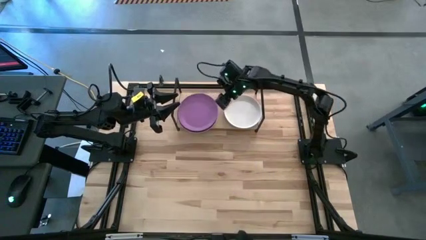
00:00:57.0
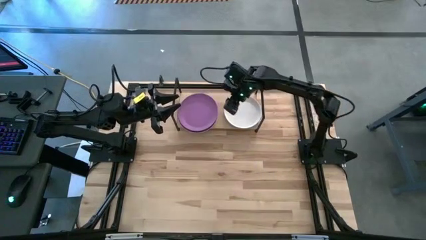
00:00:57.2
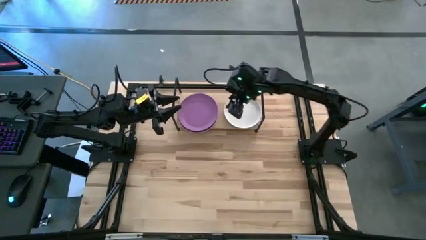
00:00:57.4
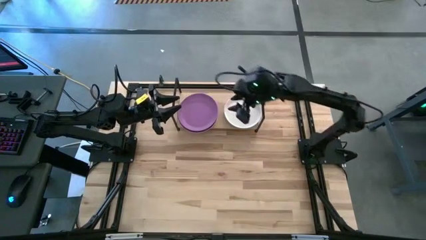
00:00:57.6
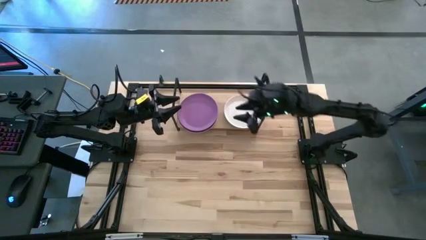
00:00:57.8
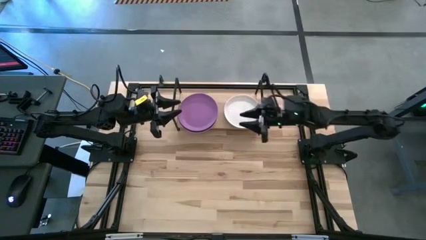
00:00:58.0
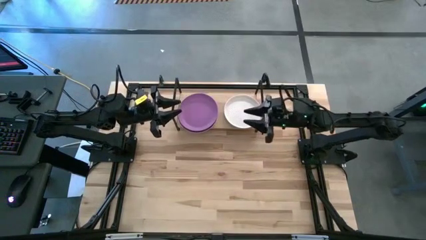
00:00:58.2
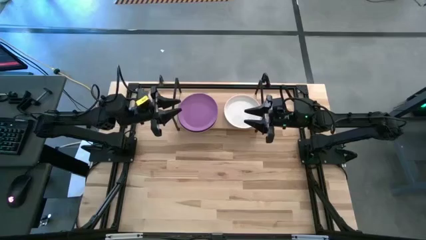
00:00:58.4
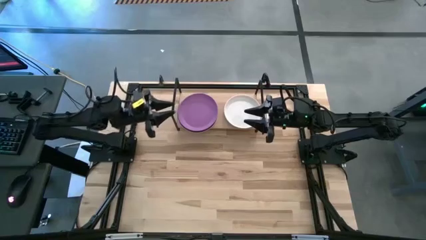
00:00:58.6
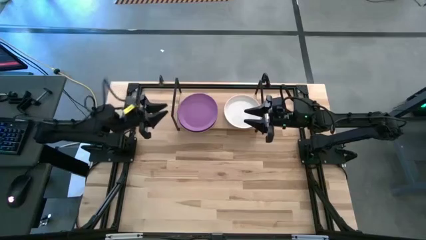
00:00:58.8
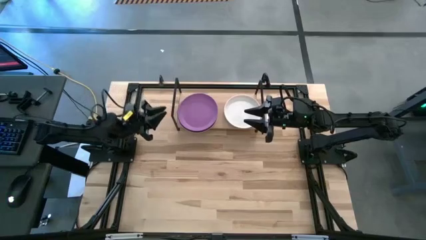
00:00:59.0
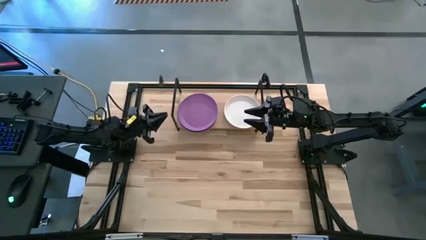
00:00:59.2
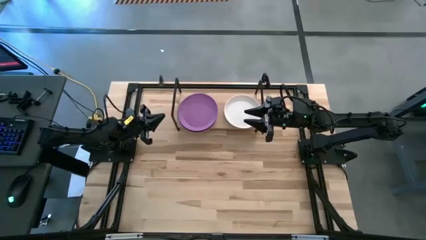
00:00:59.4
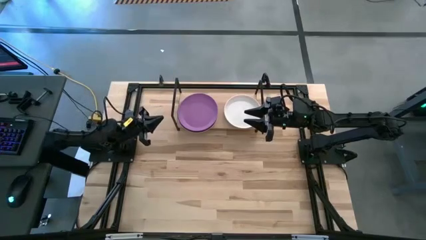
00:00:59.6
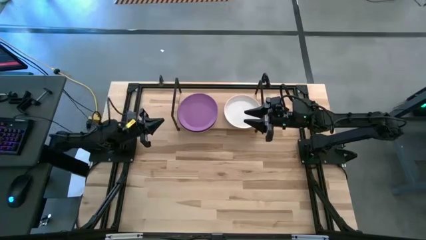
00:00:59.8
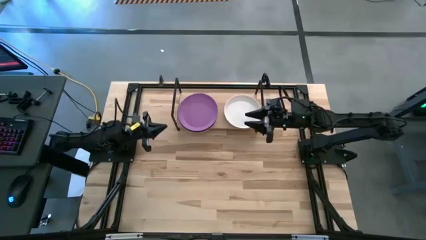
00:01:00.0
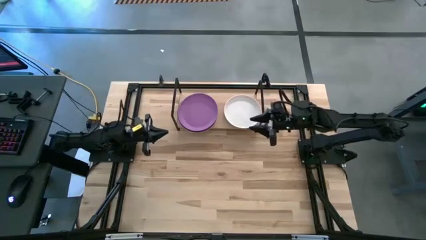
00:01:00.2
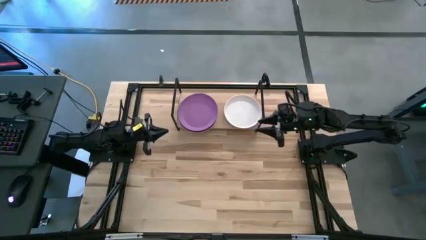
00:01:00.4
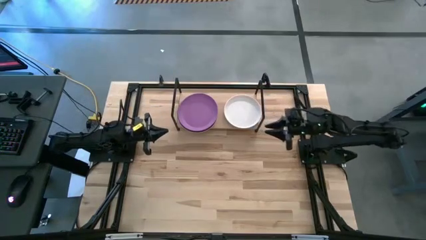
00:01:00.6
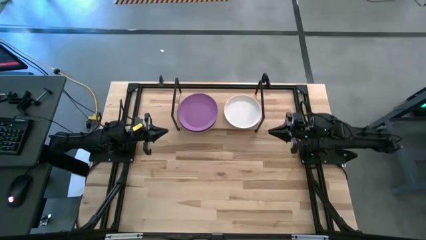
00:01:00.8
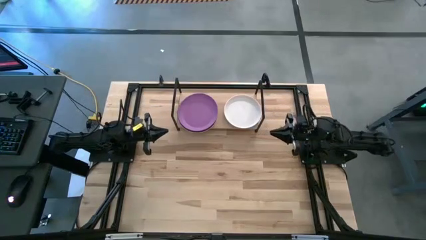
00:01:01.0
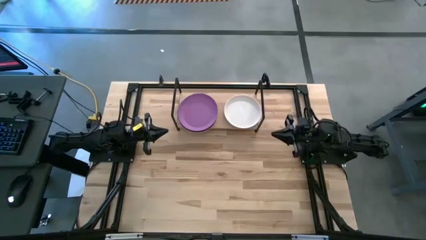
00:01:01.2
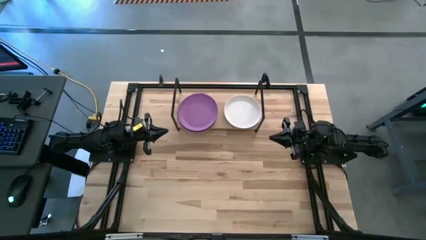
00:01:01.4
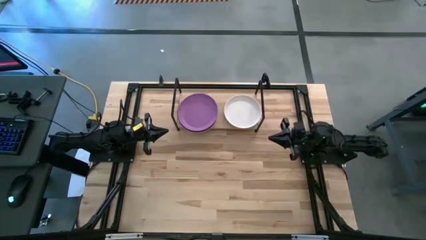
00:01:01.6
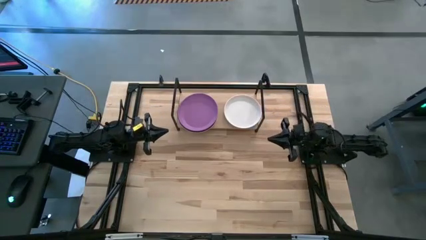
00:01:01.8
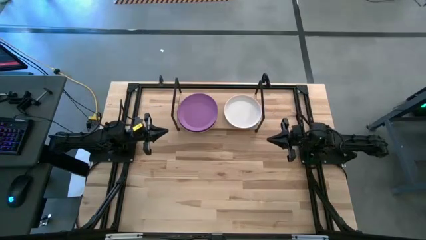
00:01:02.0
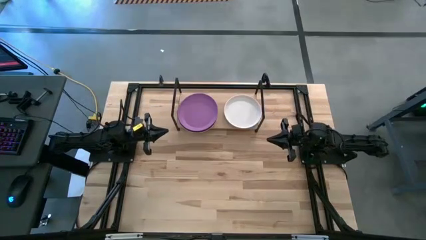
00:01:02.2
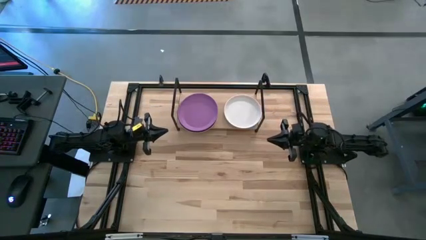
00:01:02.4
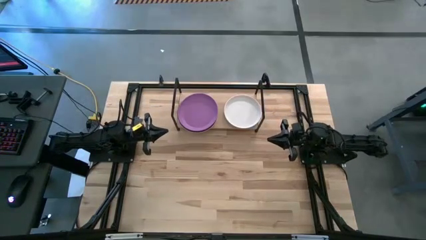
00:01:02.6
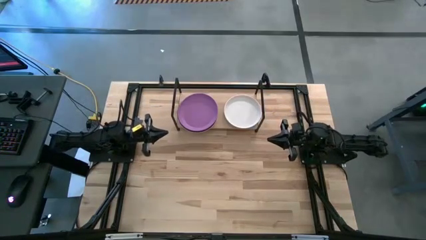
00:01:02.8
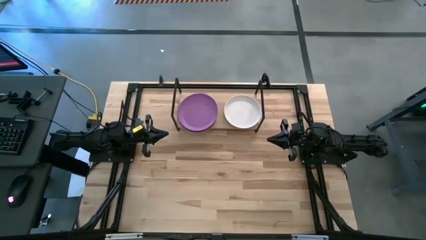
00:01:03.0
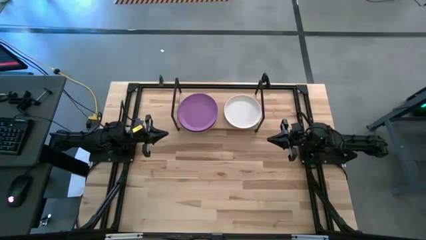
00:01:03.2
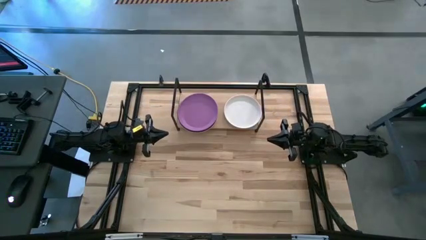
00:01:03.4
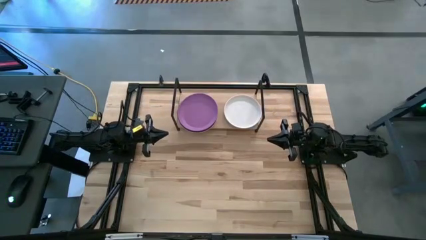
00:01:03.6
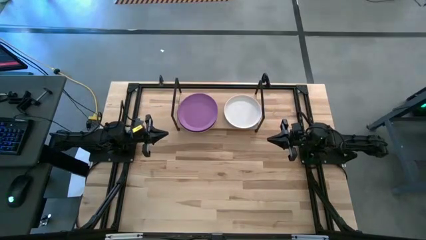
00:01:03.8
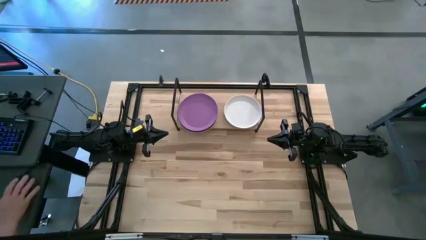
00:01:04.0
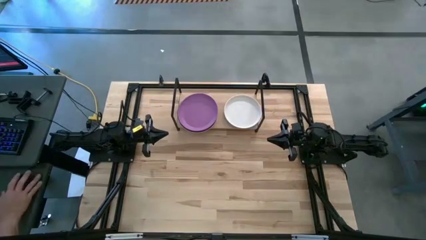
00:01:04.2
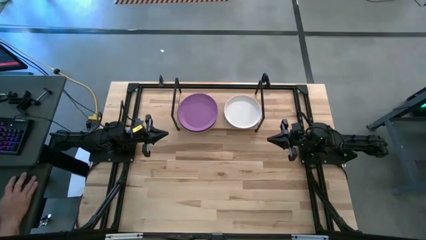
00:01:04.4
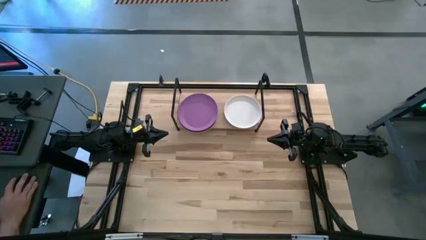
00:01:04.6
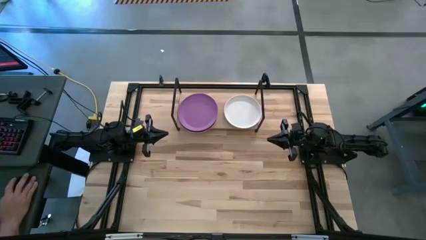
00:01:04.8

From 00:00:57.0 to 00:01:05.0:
Task: Place and stack plates onto a shelf
Return to Home Position

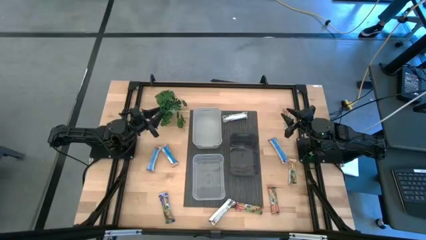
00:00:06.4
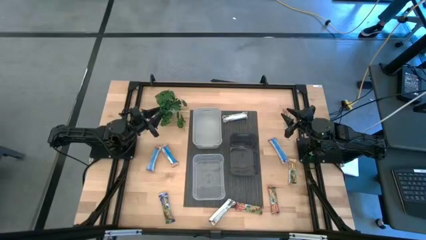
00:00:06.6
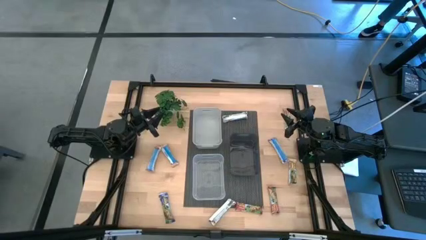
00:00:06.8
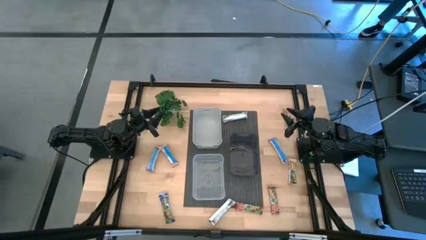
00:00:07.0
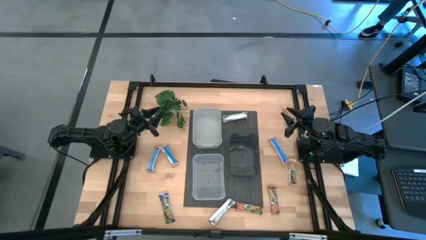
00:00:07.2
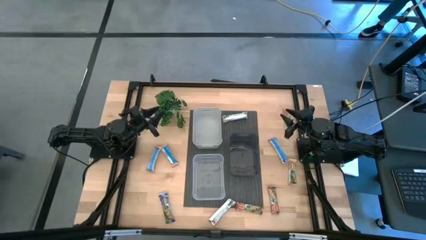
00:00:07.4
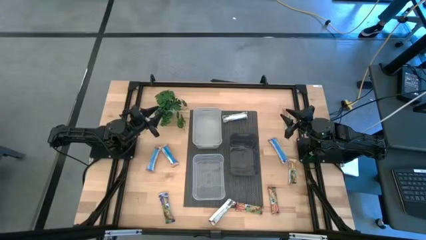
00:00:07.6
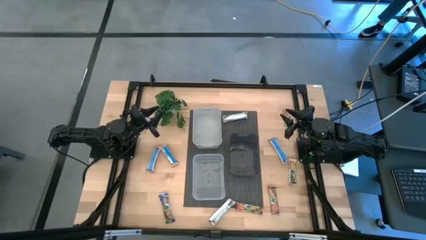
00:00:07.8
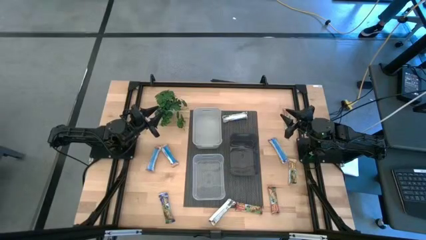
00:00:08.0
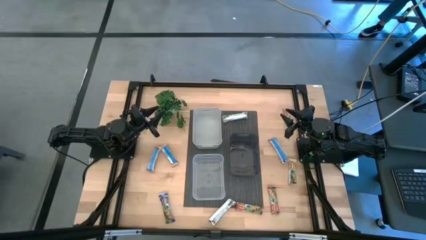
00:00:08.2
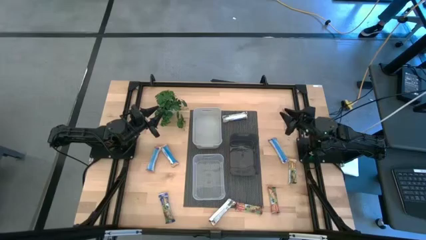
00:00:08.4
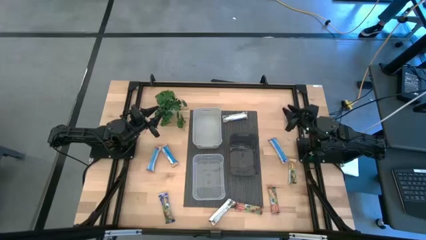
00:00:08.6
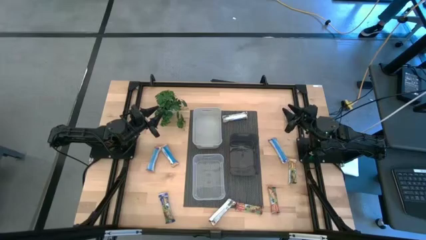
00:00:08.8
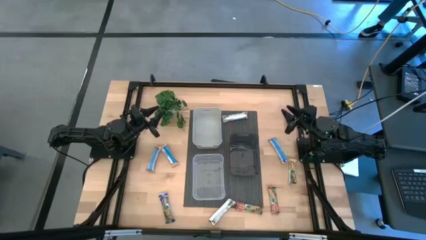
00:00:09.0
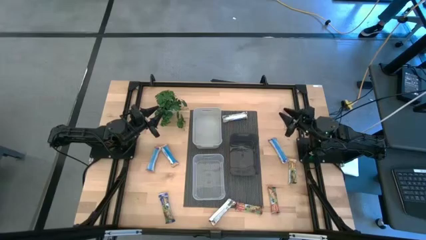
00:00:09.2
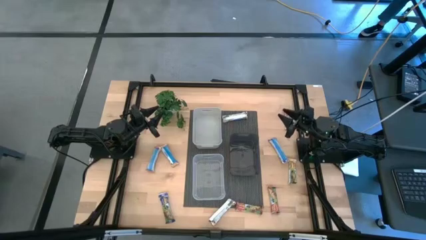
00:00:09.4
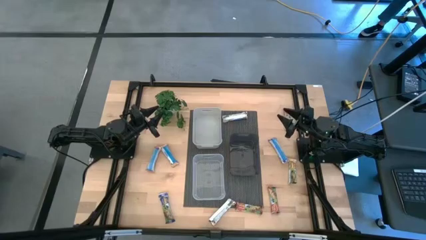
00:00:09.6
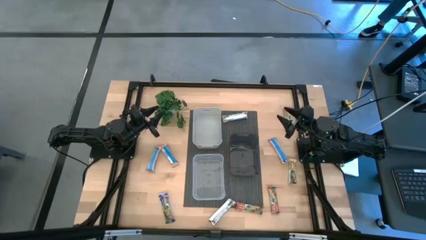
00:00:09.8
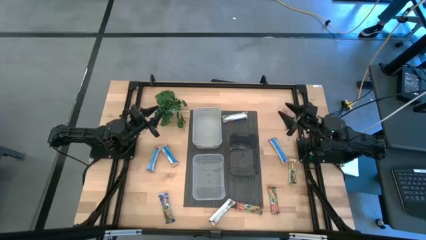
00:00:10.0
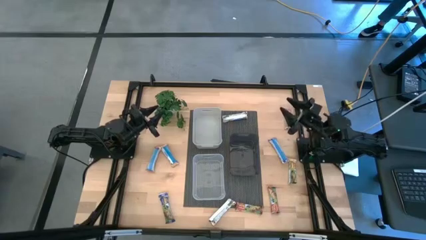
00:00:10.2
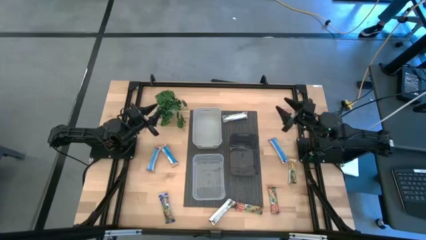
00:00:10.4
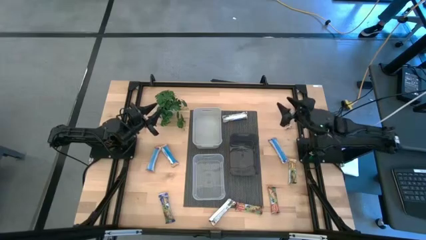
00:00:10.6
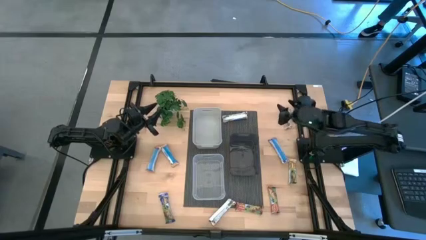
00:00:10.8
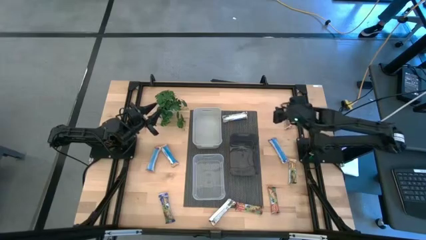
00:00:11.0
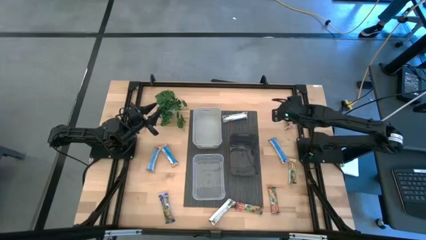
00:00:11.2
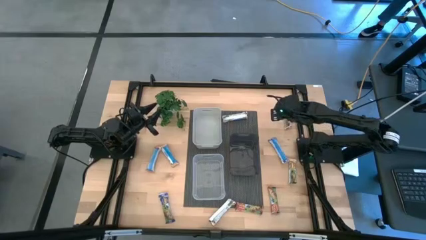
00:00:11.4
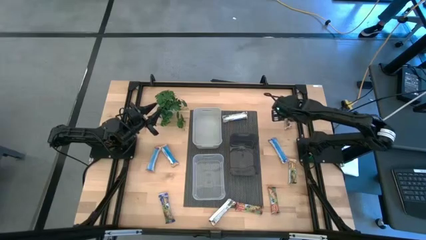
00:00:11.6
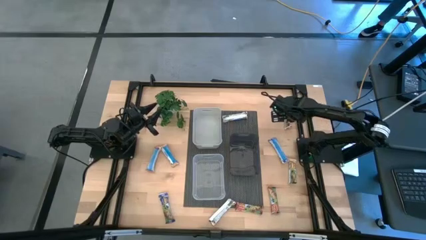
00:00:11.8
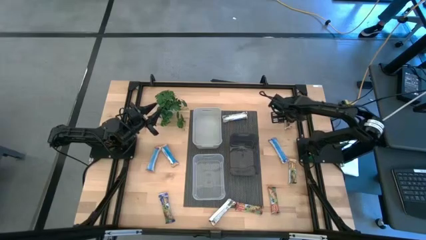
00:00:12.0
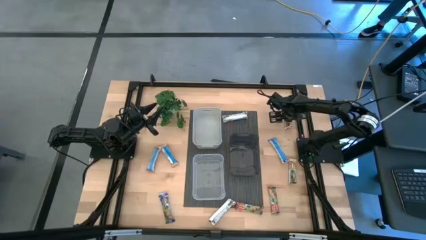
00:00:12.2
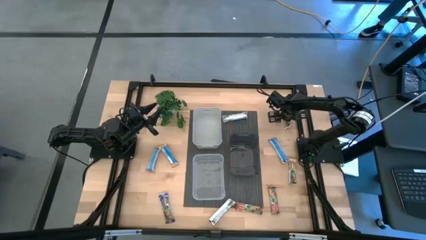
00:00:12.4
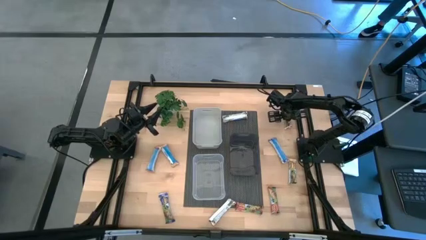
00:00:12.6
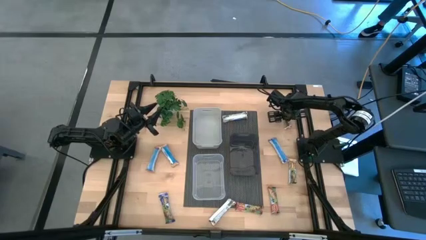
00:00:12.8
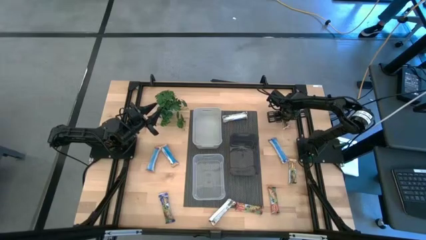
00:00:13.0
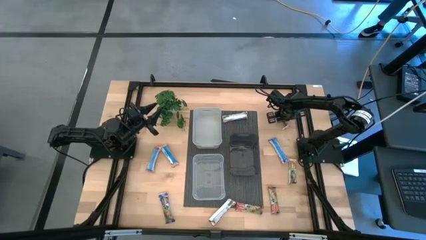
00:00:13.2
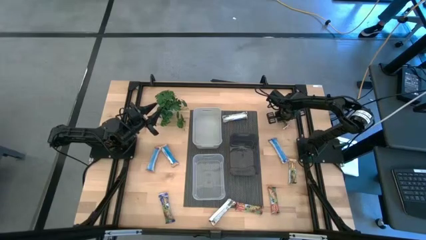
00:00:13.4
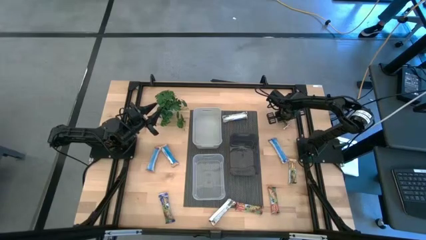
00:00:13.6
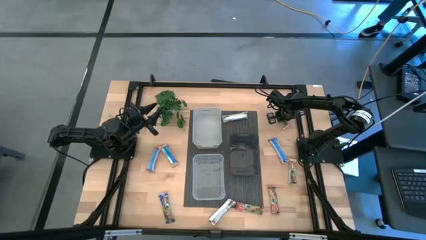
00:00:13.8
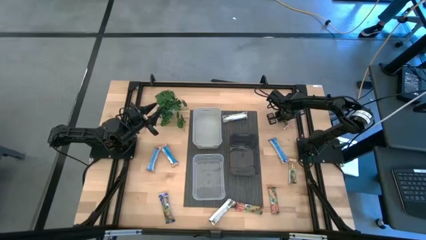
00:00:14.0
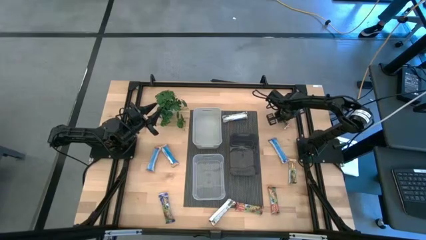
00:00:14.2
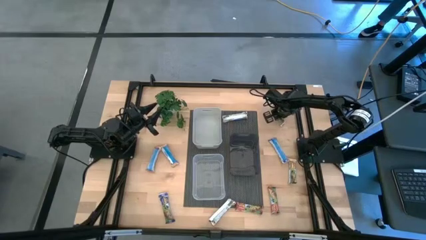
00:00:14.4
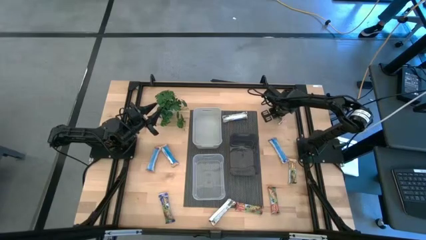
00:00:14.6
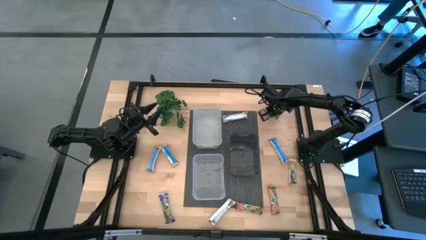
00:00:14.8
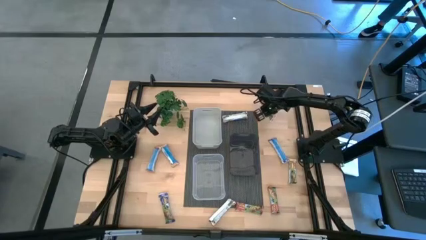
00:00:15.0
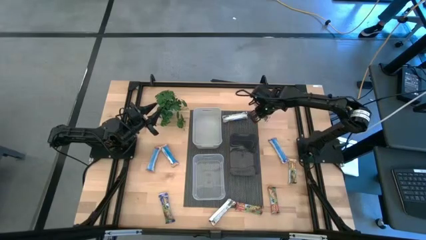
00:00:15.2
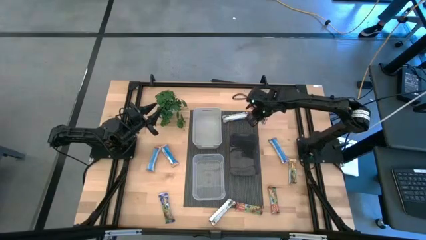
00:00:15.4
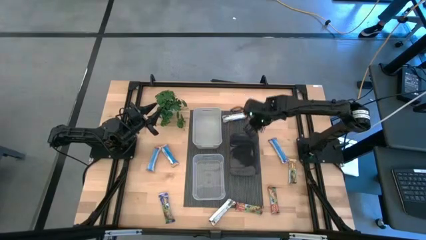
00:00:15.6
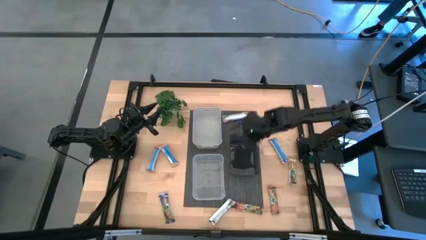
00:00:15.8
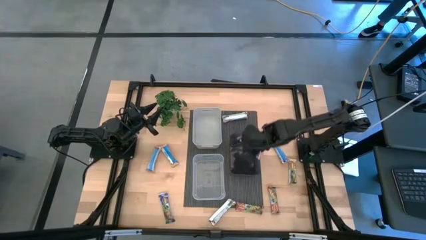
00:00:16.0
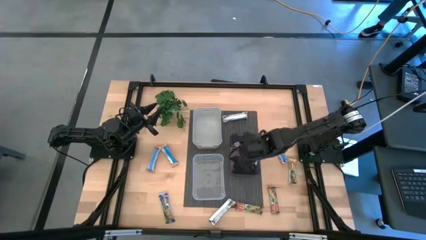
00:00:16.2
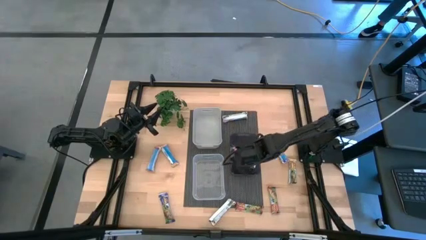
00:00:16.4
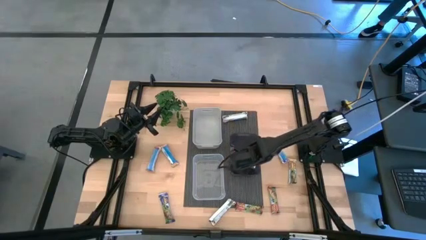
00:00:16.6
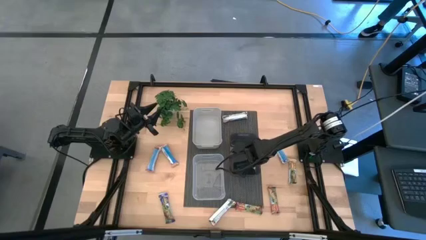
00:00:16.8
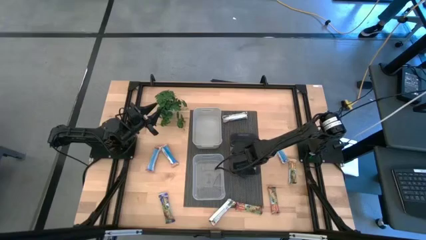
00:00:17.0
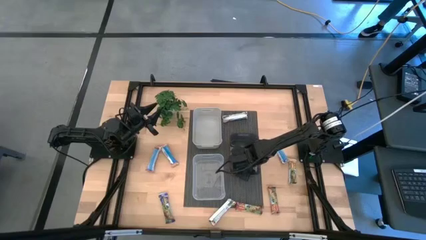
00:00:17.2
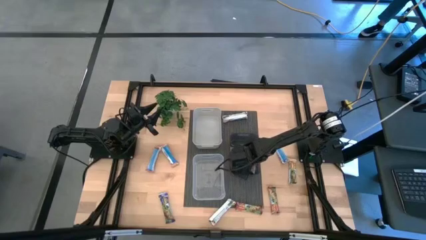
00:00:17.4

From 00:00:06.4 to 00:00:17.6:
Task: Pick and place Granola Bars by type
Put the red granola bar into the black bin
